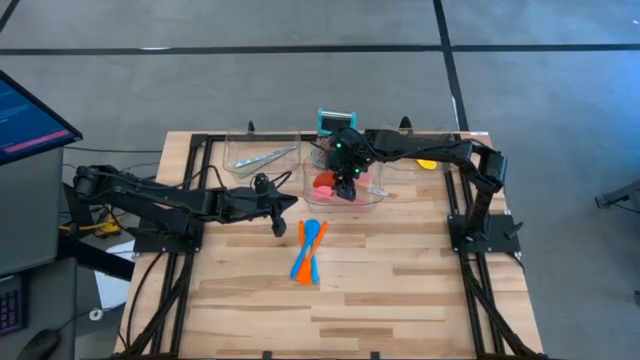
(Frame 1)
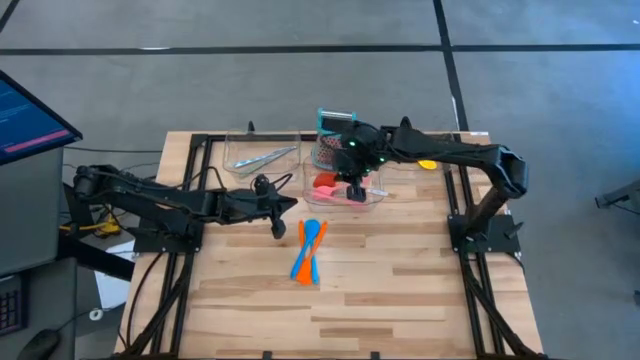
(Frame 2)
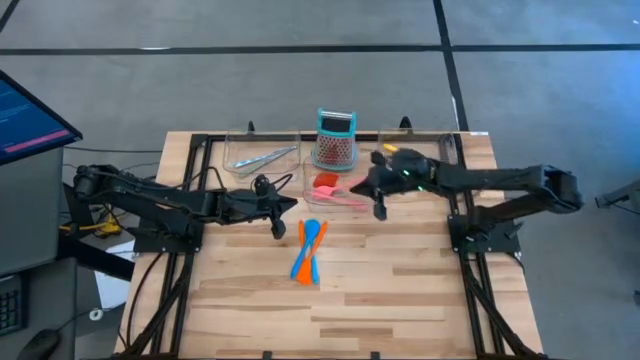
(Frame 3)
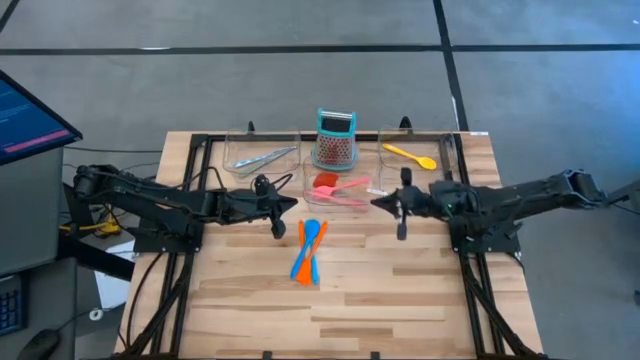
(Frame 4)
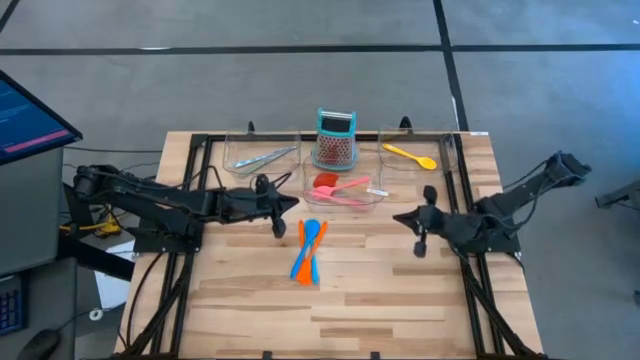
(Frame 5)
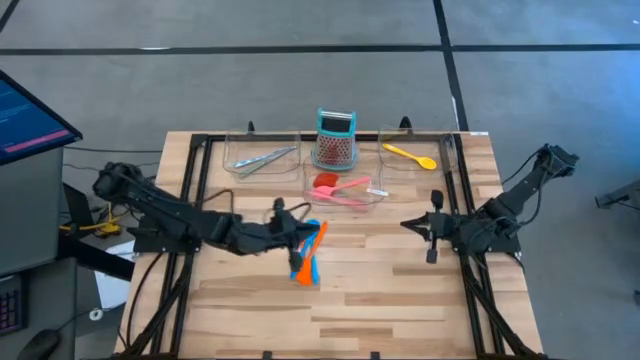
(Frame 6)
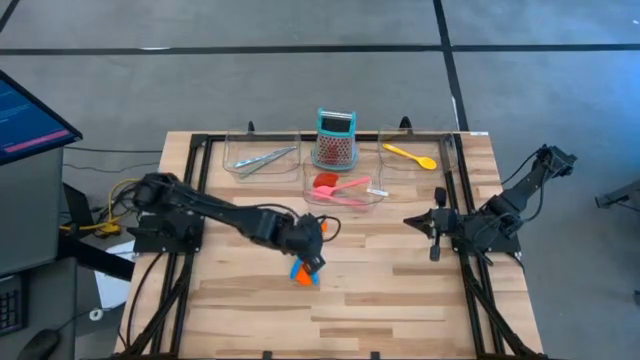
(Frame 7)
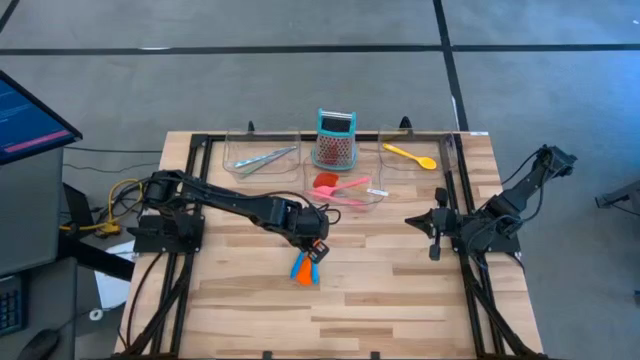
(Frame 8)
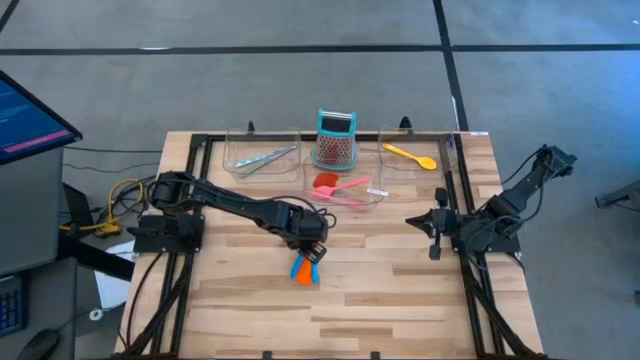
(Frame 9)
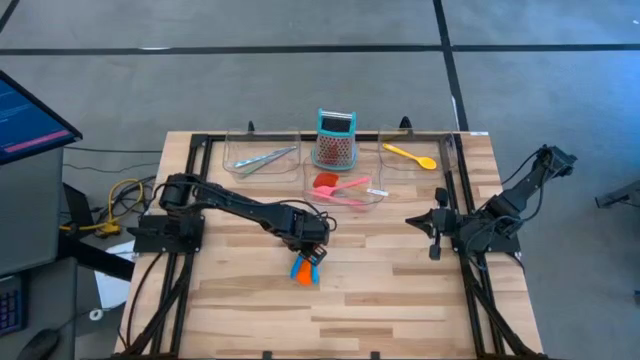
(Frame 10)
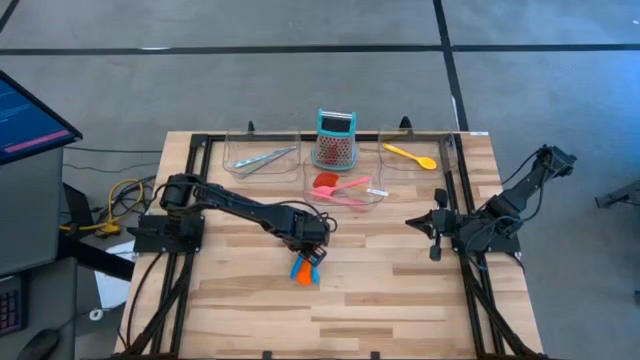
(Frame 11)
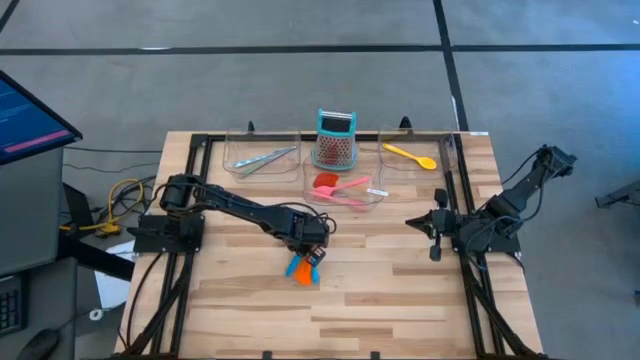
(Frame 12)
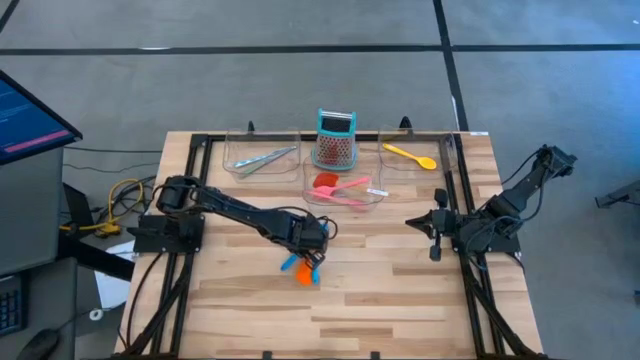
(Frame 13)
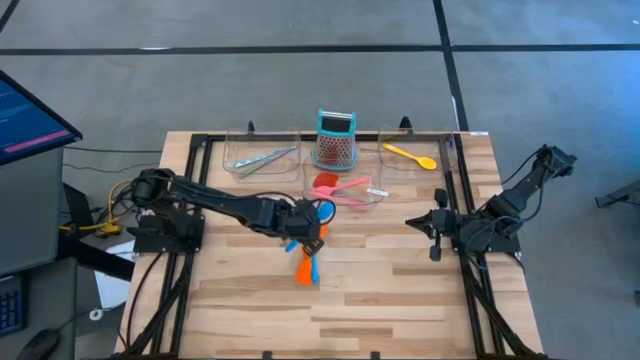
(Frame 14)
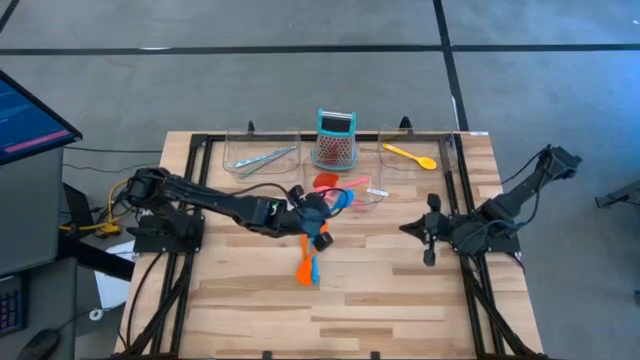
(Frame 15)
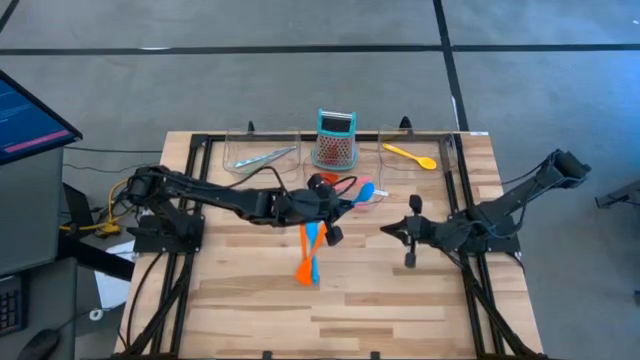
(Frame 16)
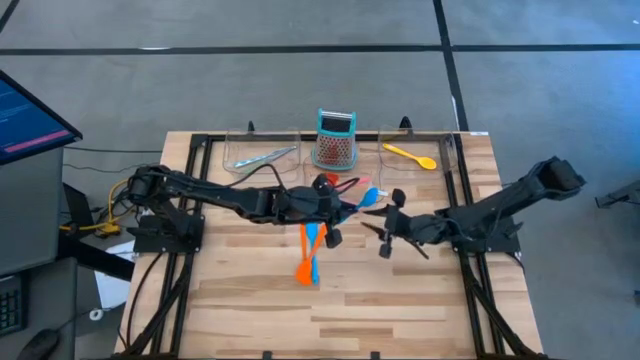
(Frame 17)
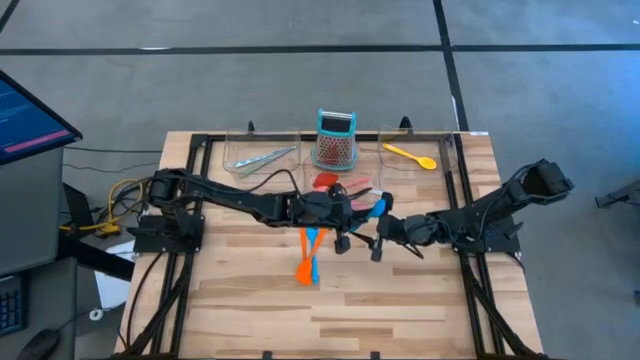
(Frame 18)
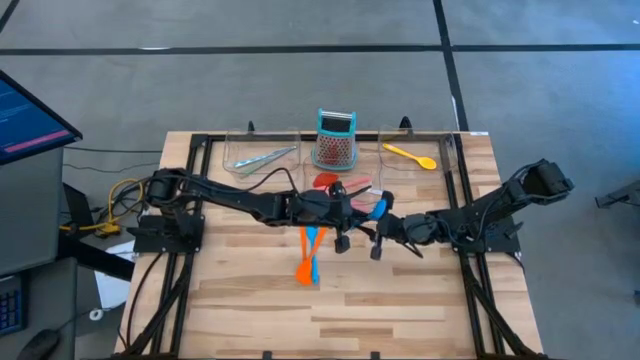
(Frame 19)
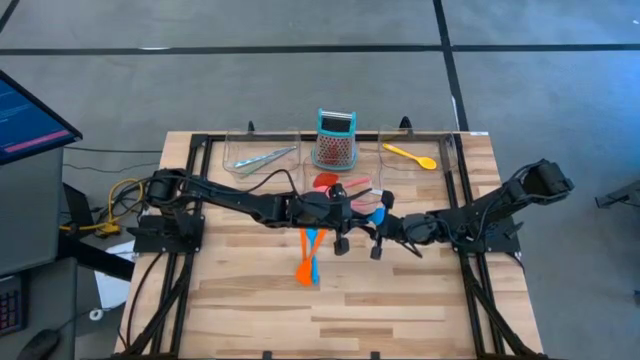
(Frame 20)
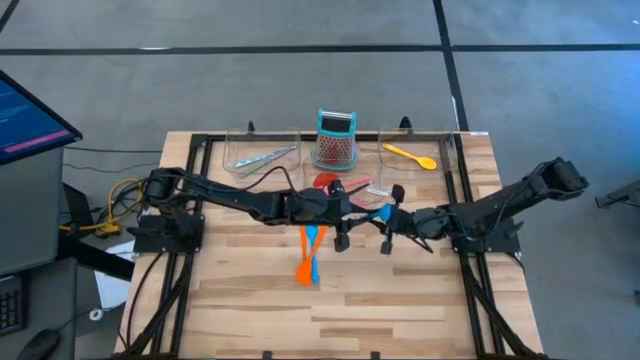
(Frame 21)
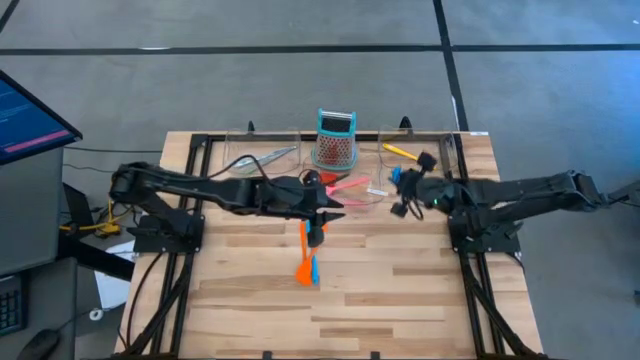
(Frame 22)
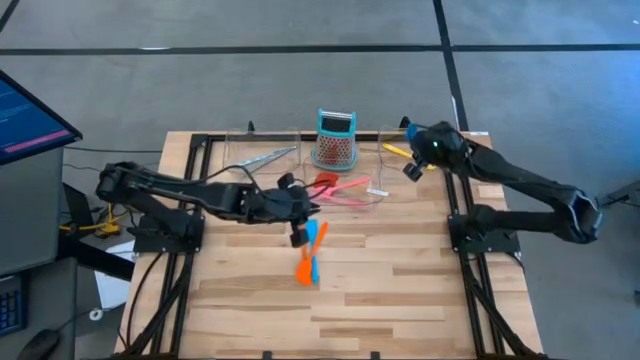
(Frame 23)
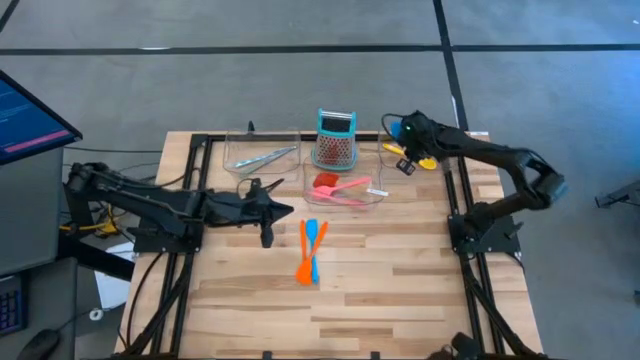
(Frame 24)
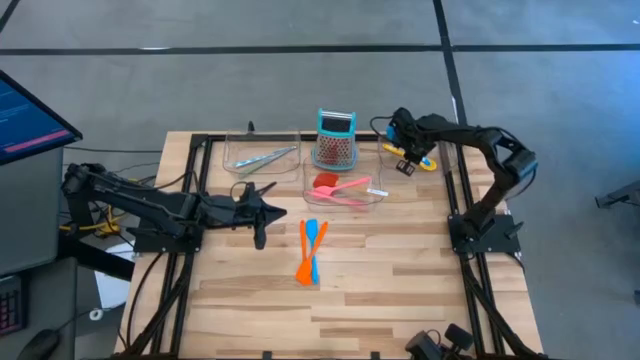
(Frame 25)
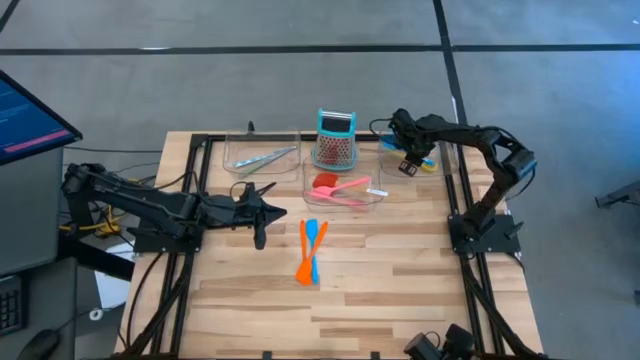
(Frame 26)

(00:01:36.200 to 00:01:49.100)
Task: Pick & Place Kitchen Items
Put the blue serving spoon into the right transparent bin

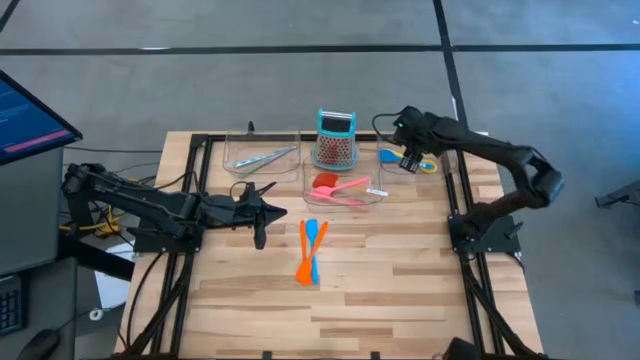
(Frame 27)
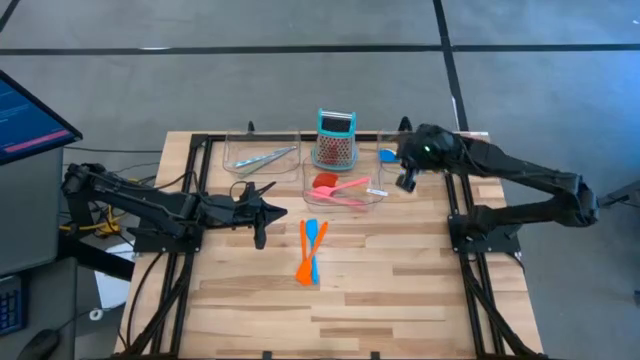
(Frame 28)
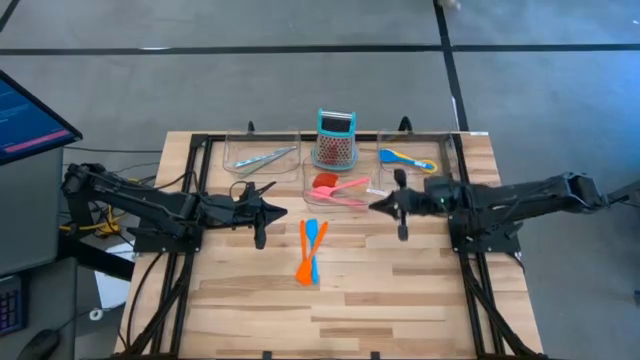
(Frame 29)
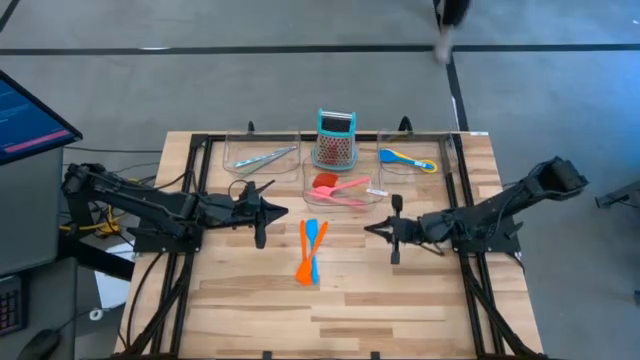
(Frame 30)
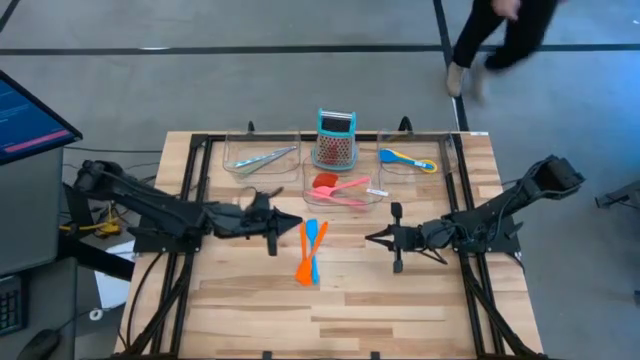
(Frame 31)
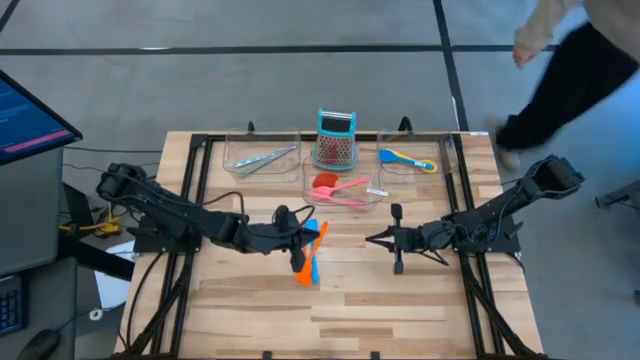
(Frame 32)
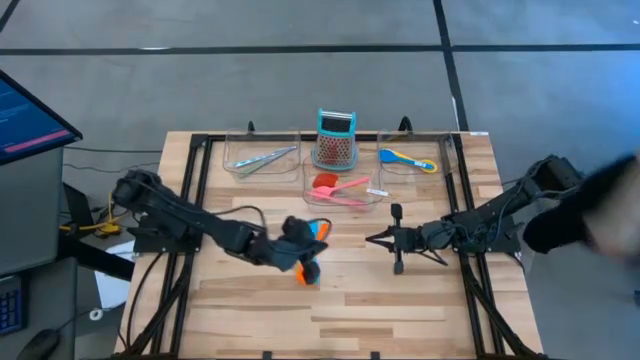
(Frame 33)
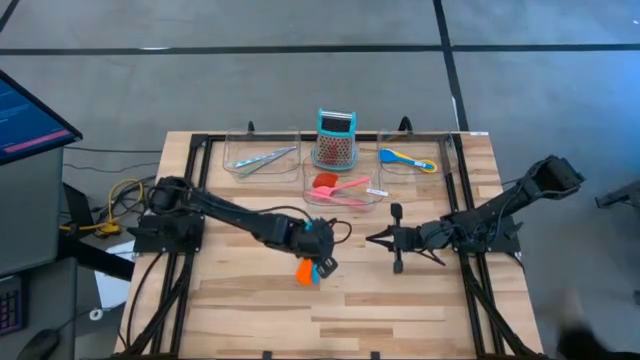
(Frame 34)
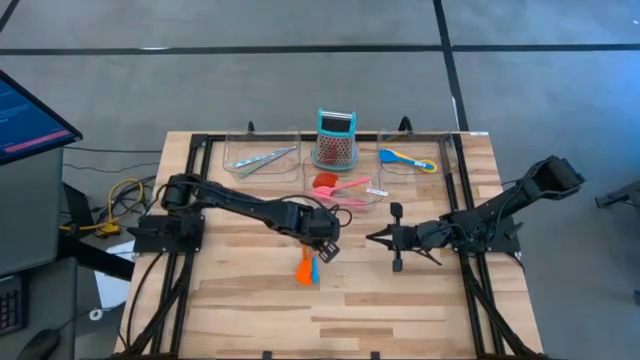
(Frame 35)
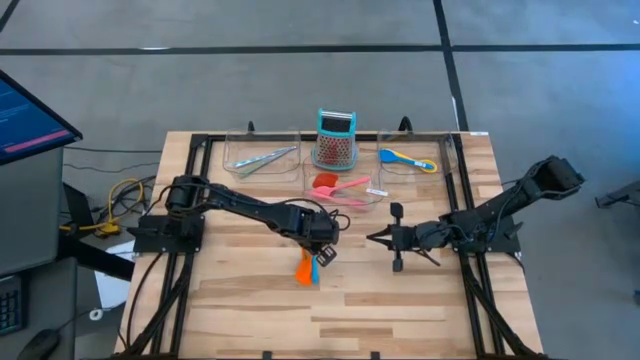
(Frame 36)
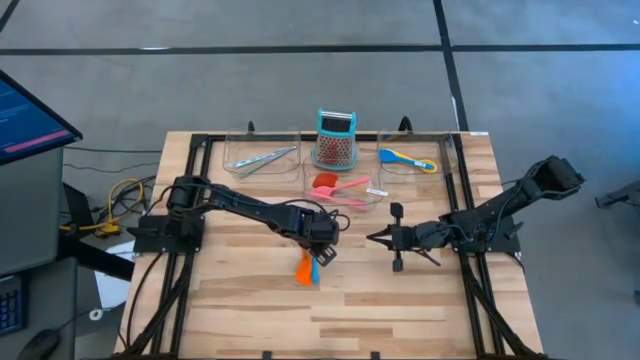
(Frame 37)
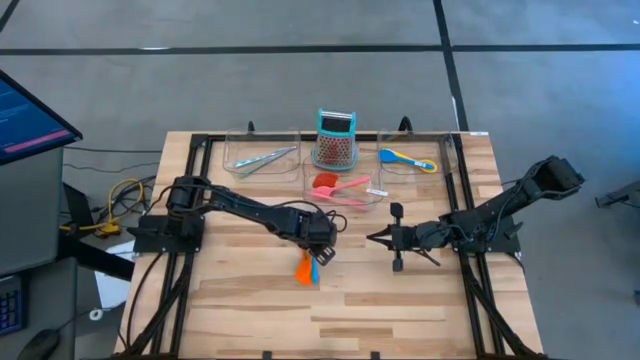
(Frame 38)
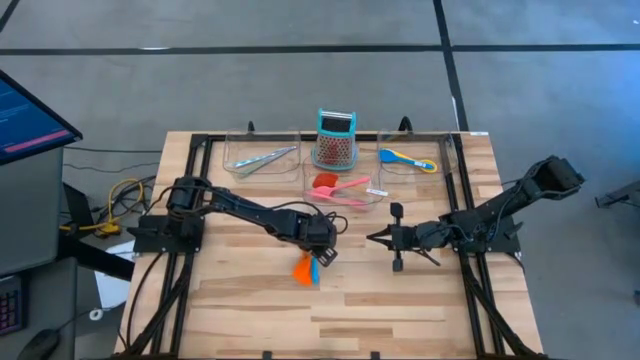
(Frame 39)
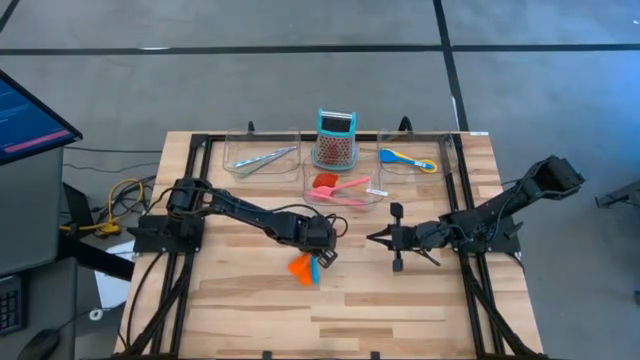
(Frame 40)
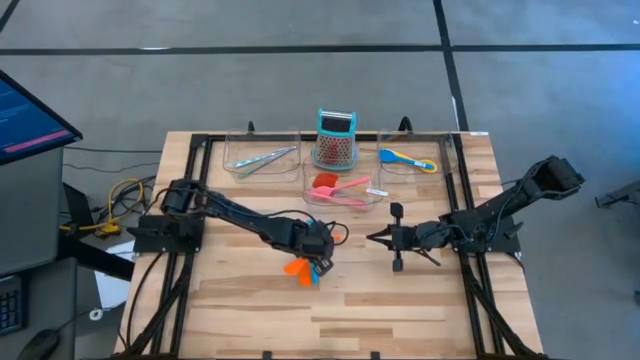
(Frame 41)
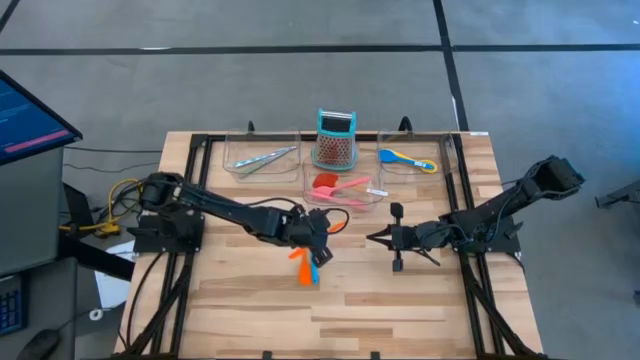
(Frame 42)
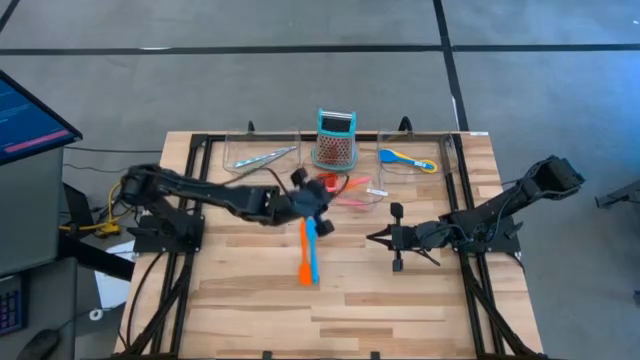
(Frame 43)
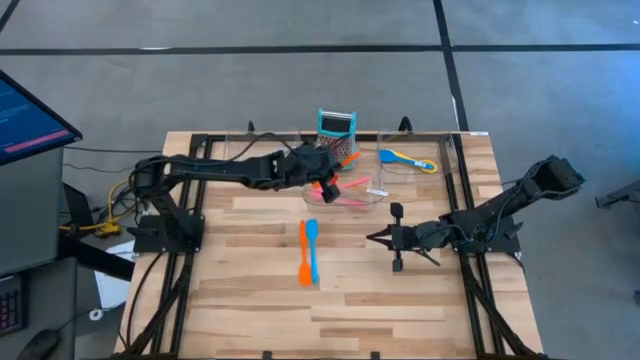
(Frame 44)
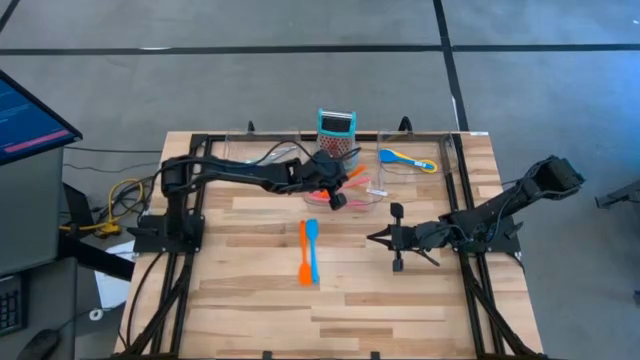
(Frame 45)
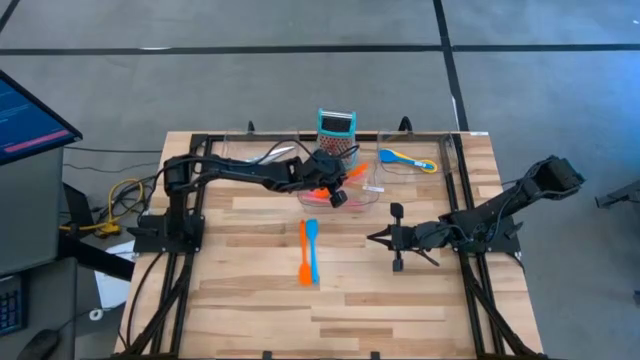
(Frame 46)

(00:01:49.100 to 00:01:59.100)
Put the top orange spatula into the middle transparent bin
